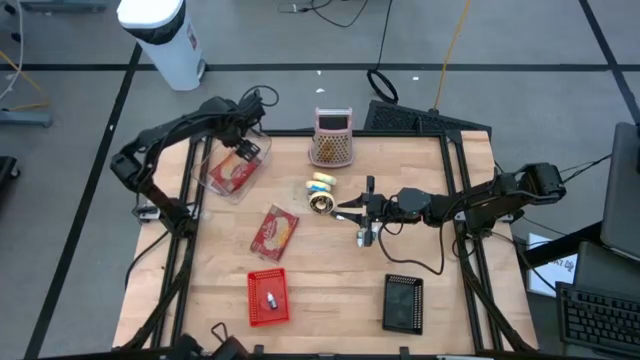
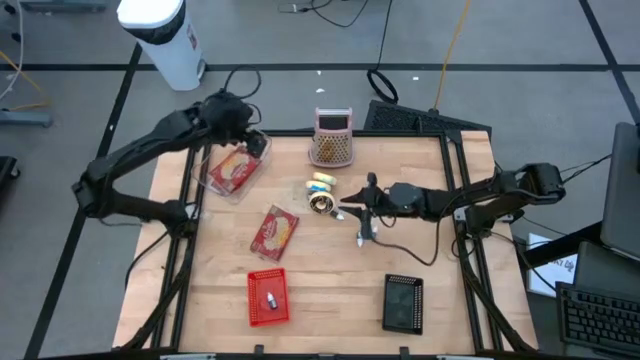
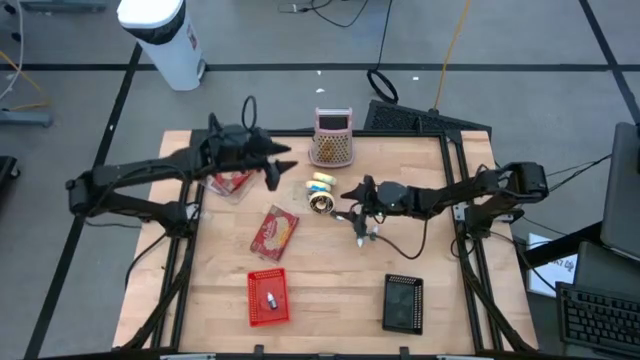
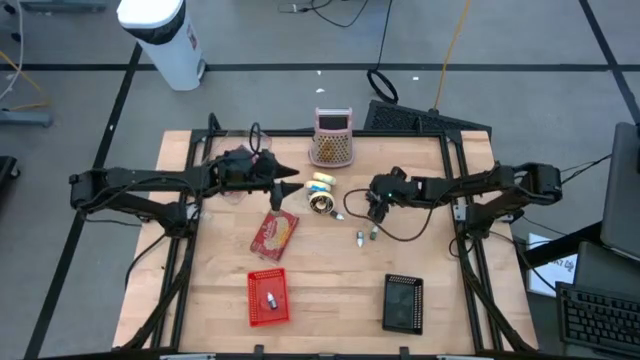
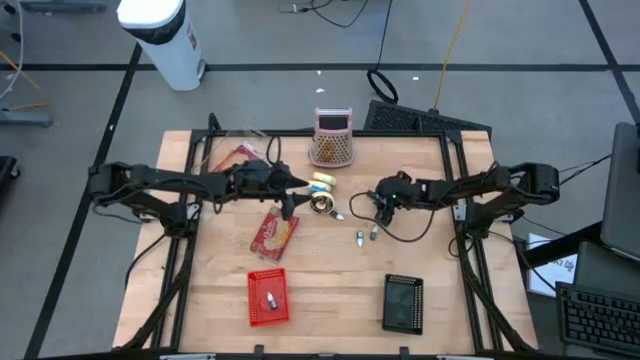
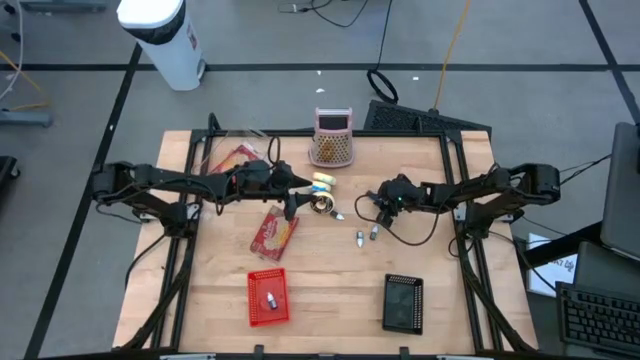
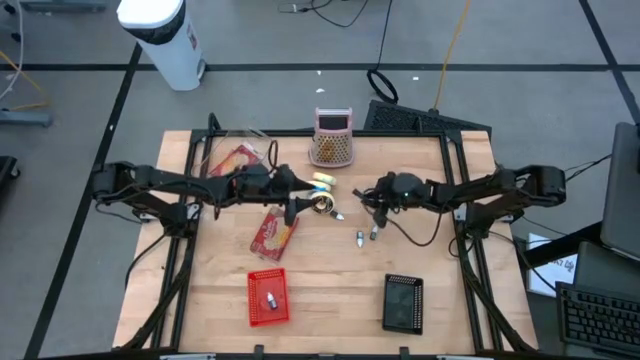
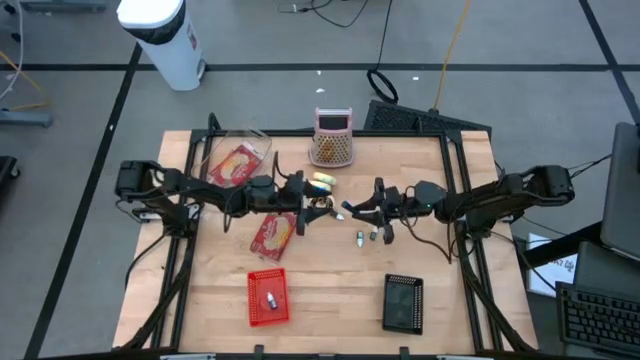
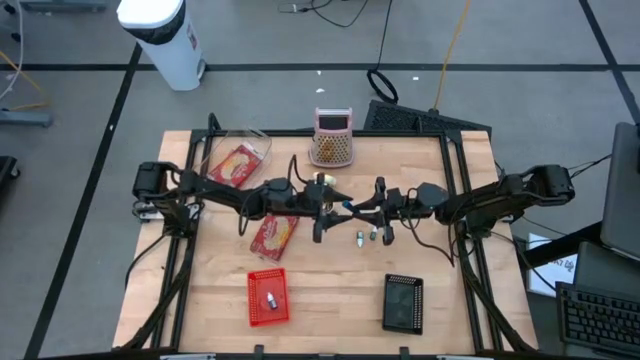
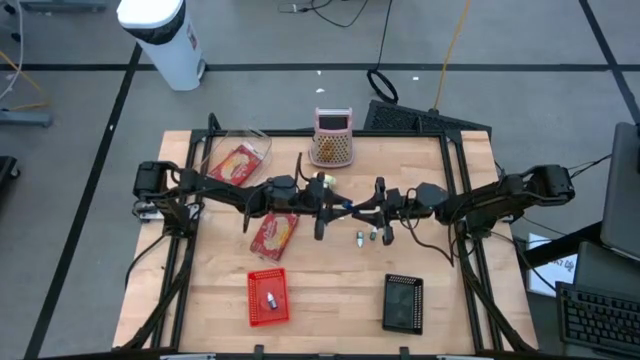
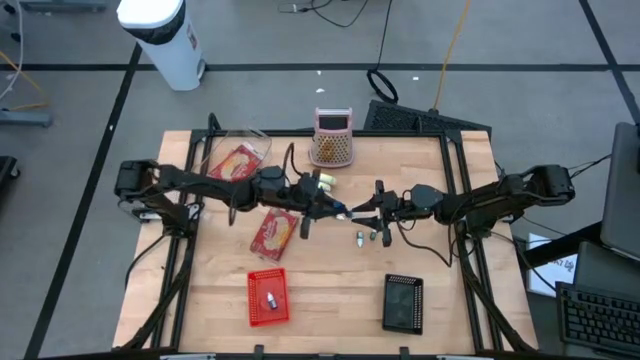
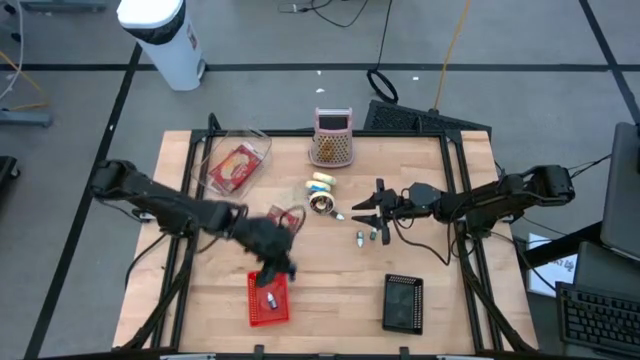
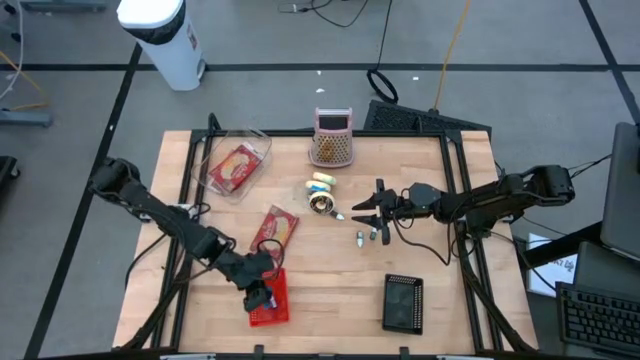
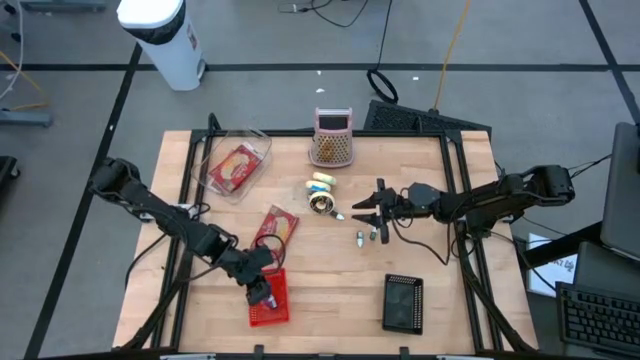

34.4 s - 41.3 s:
Put the right blue food coloring bottle into the red bin

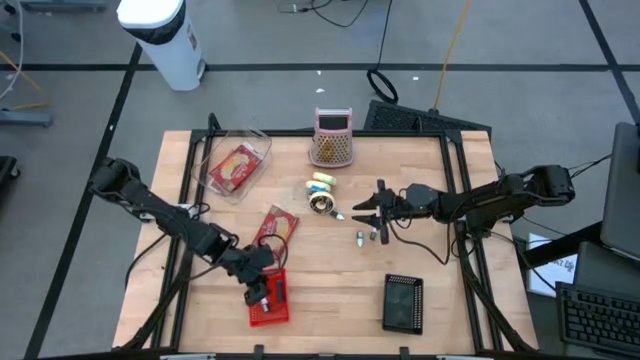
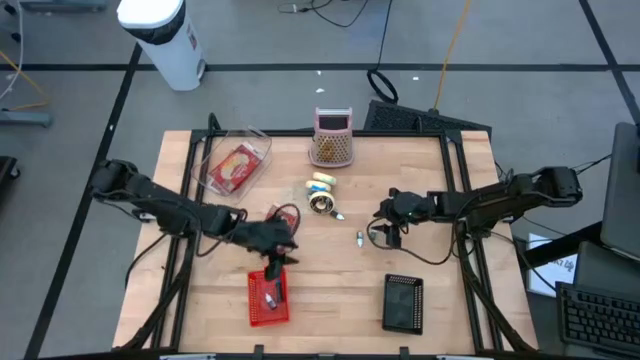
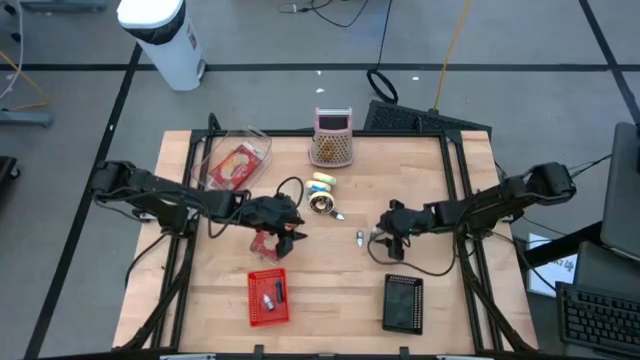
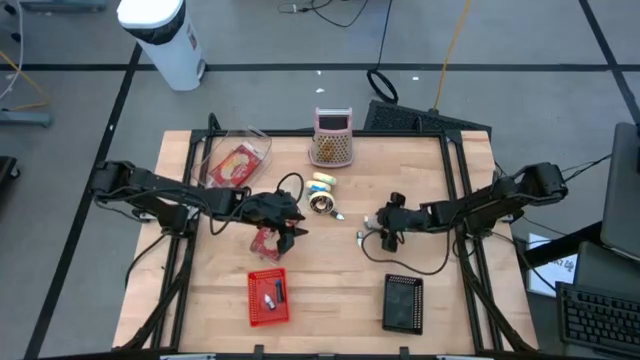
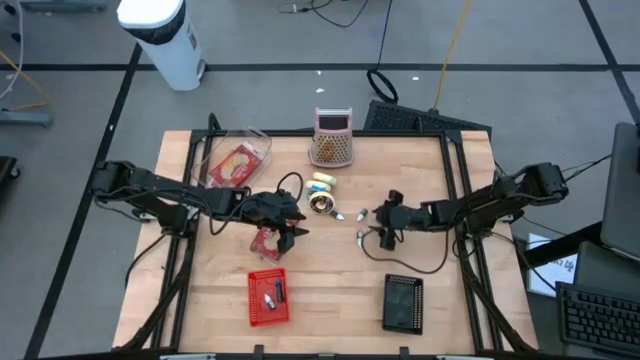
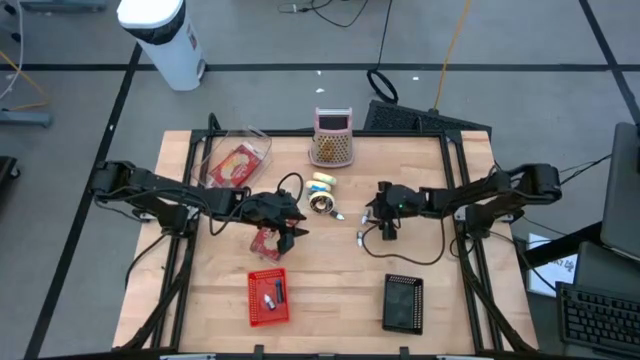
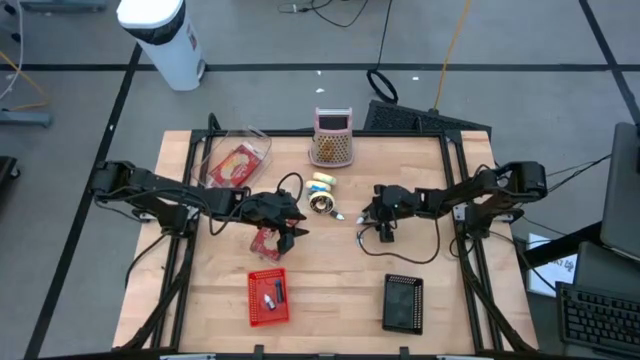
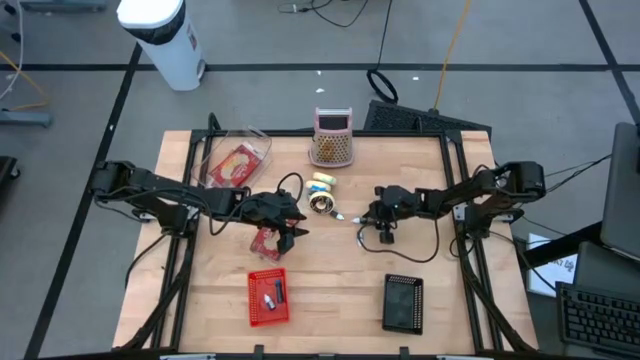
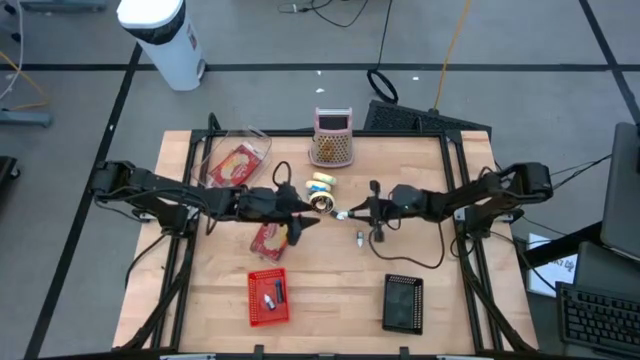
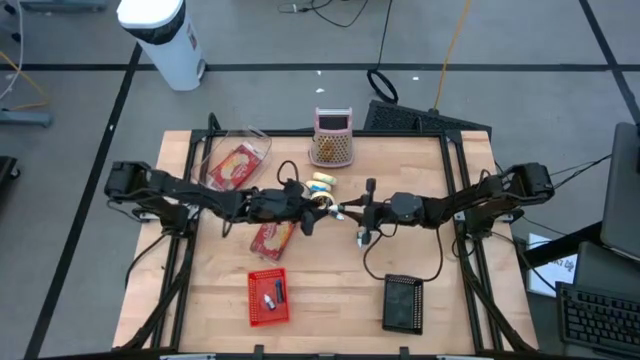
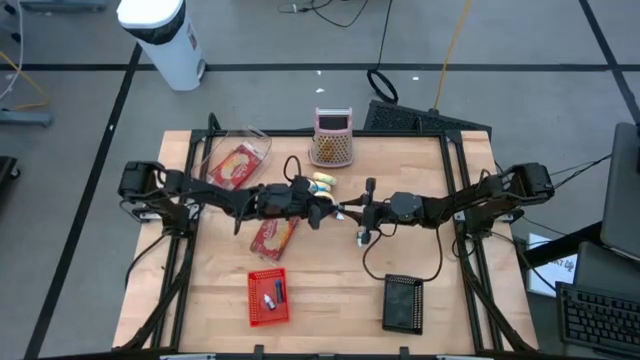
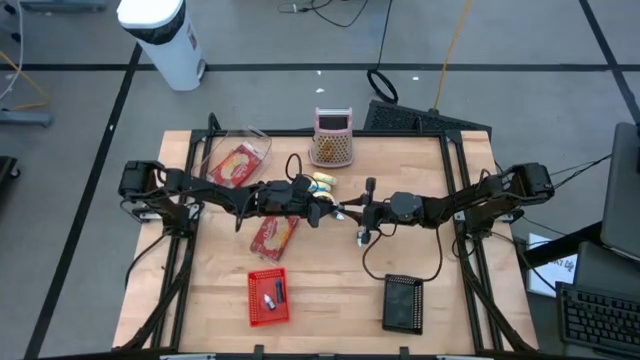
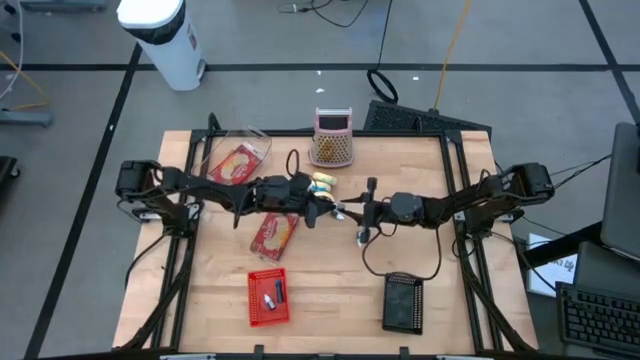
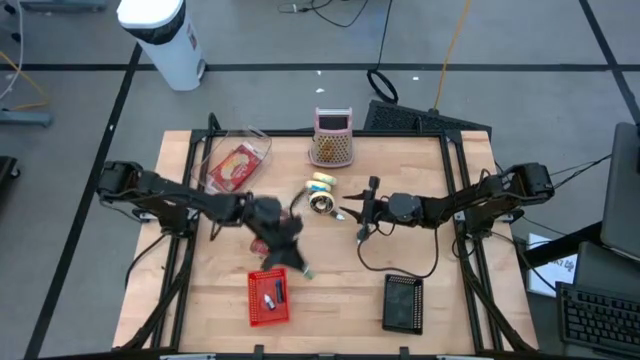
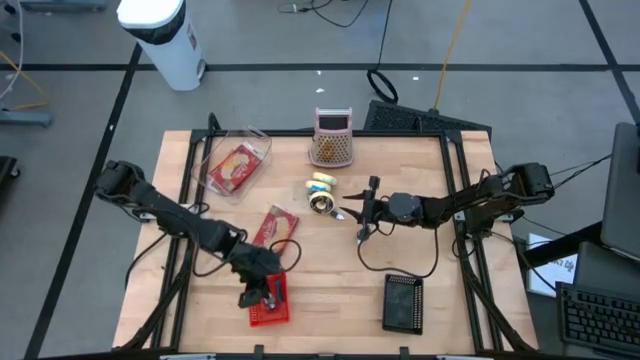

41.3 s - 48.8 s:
Put the green food coloring bottle into the red bin

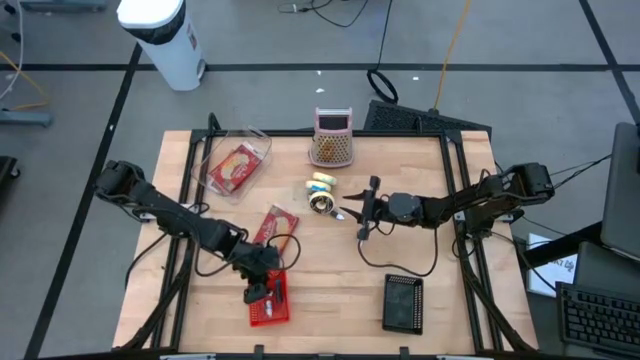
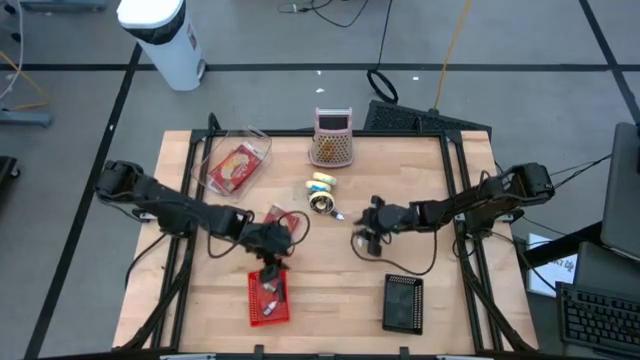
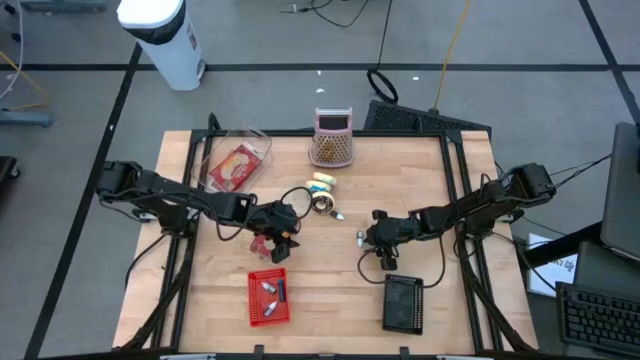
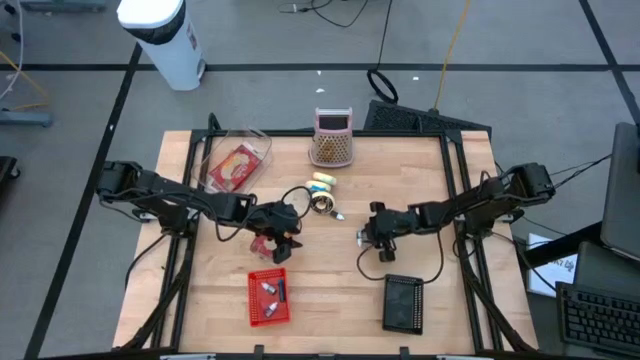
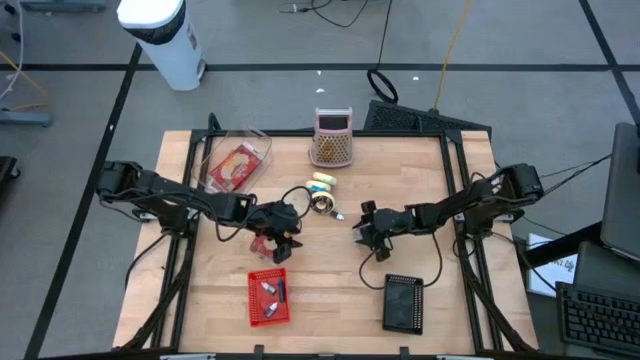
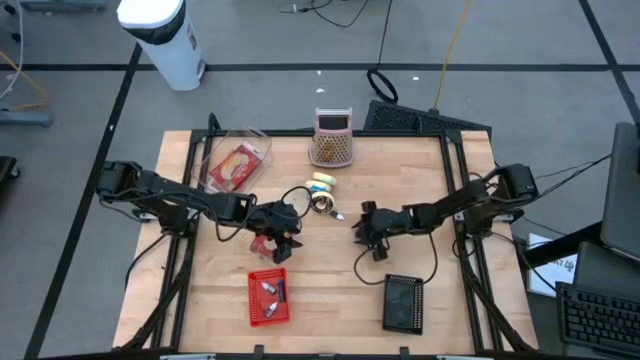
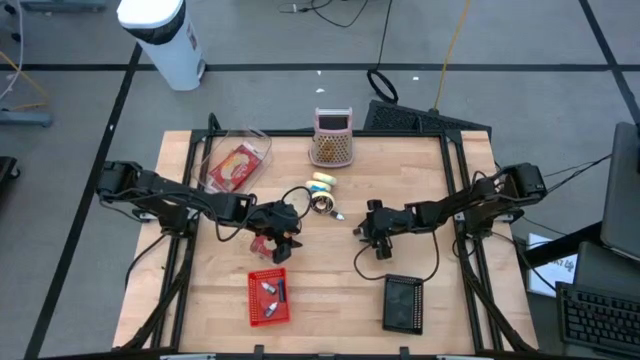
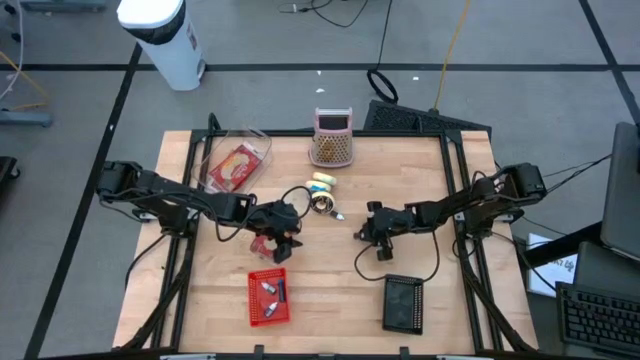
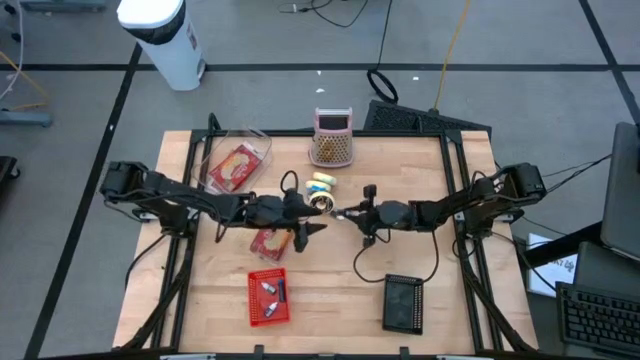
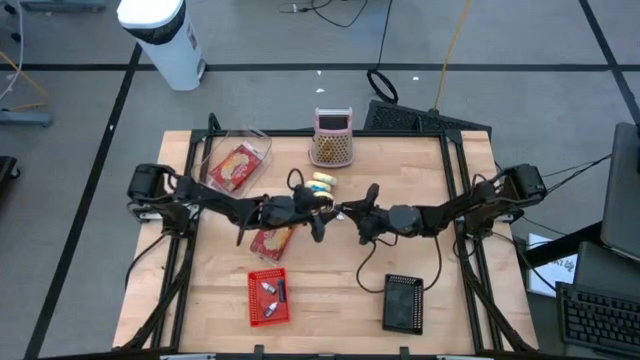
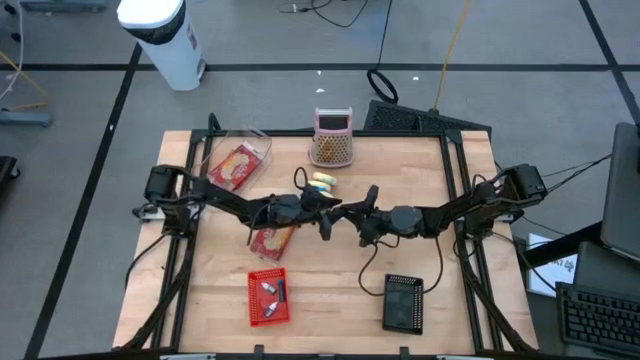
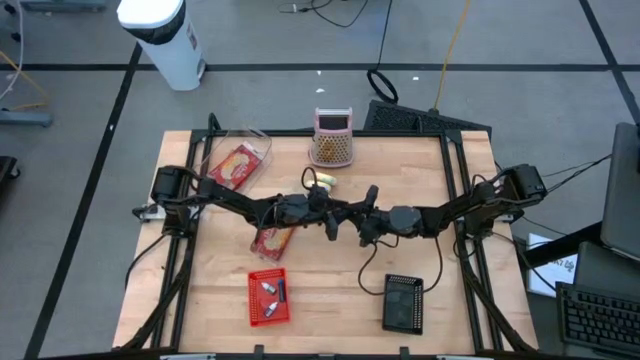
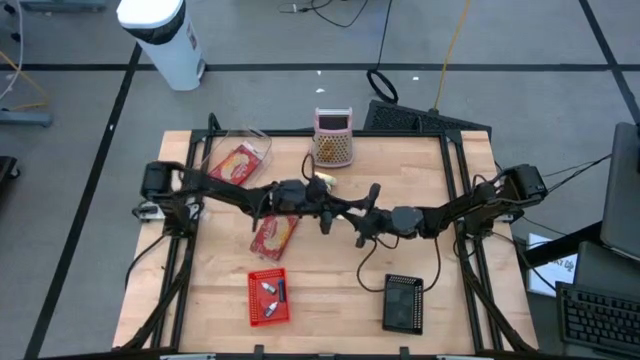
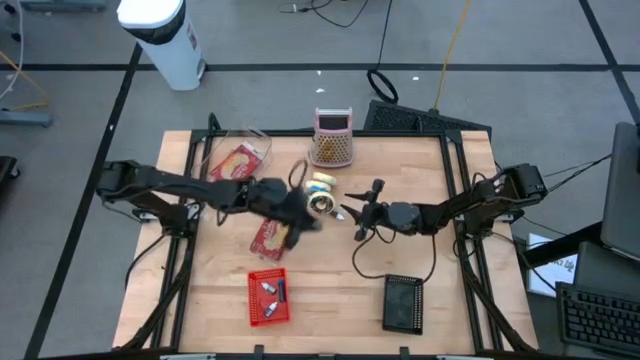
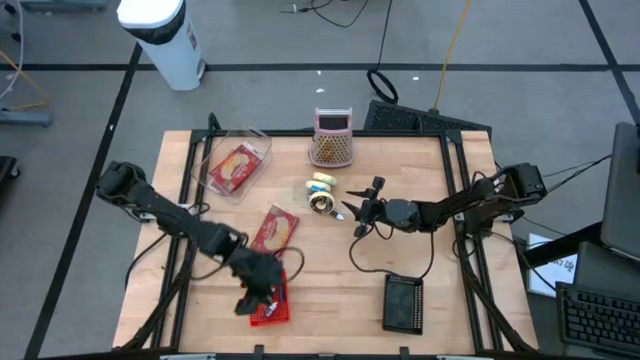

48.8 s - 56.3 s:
Put the brown food coloring bottle into the red bin
